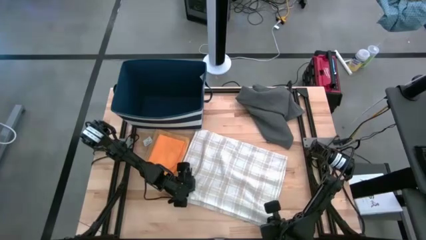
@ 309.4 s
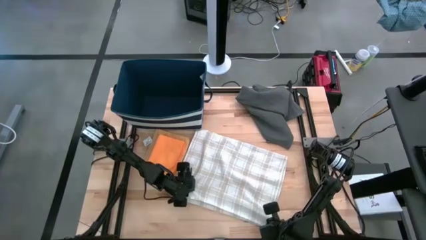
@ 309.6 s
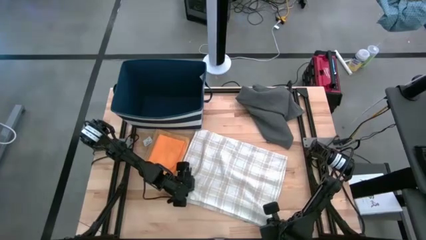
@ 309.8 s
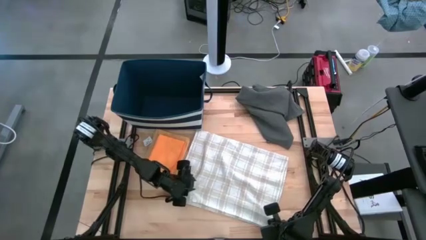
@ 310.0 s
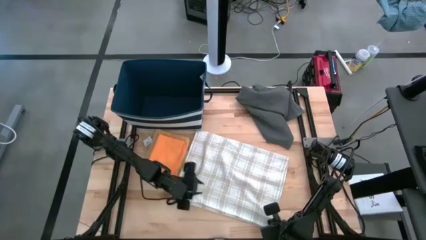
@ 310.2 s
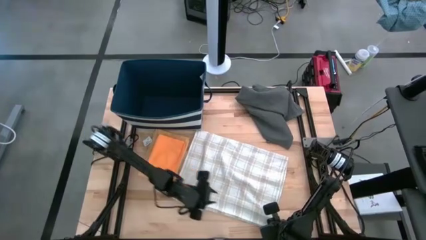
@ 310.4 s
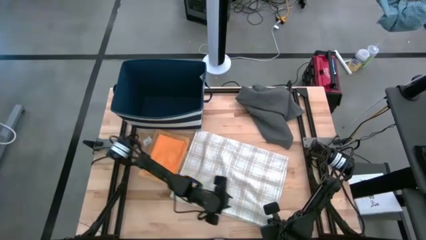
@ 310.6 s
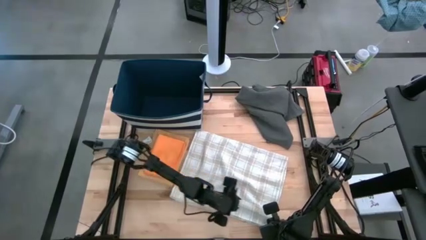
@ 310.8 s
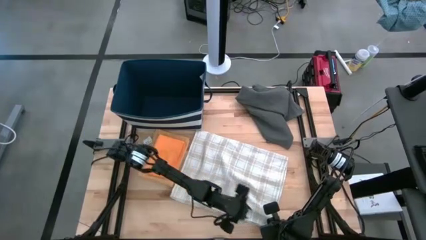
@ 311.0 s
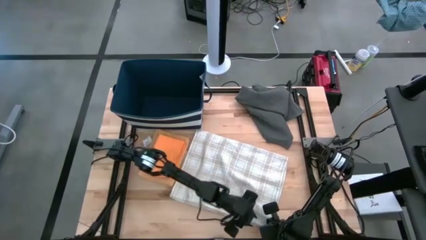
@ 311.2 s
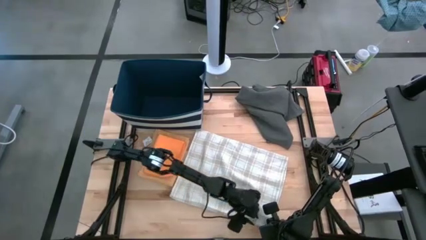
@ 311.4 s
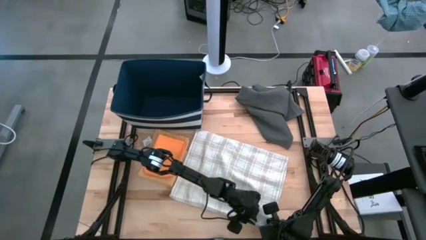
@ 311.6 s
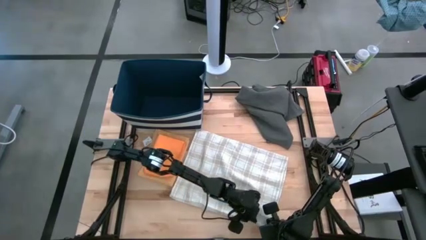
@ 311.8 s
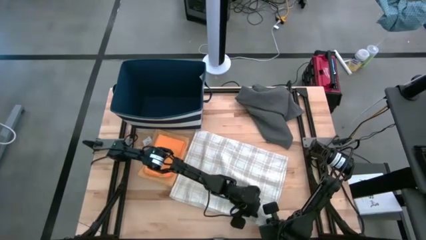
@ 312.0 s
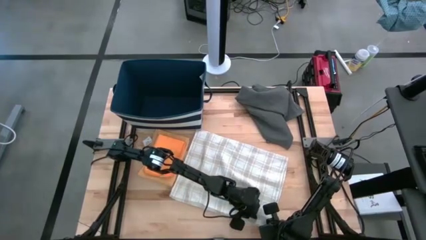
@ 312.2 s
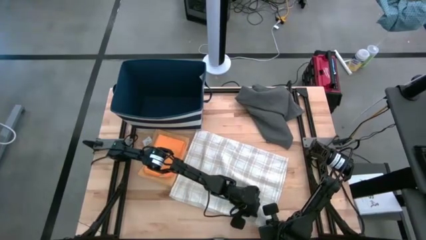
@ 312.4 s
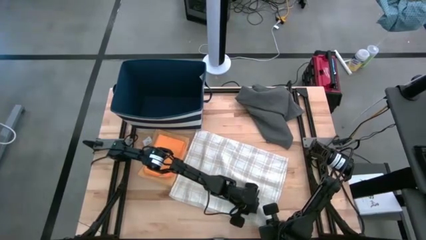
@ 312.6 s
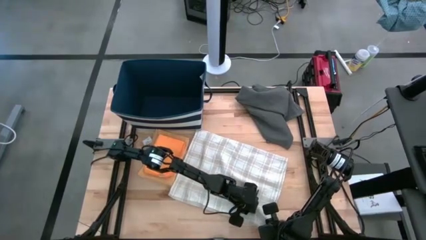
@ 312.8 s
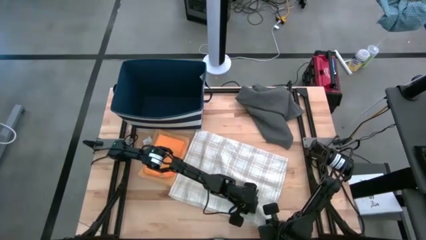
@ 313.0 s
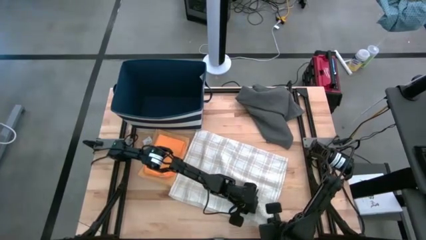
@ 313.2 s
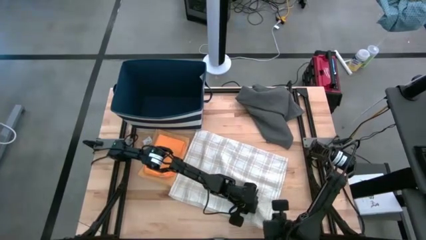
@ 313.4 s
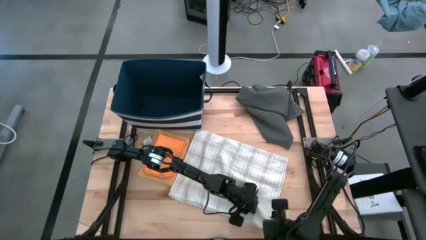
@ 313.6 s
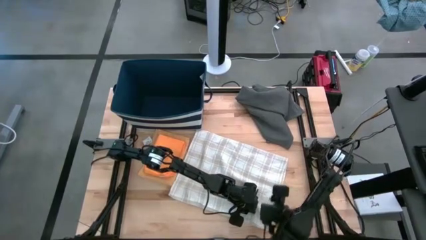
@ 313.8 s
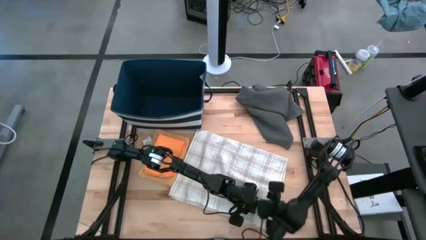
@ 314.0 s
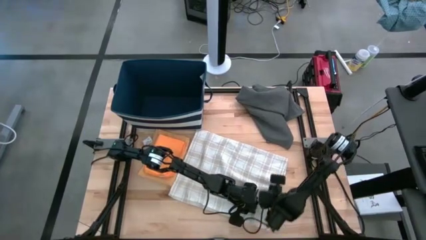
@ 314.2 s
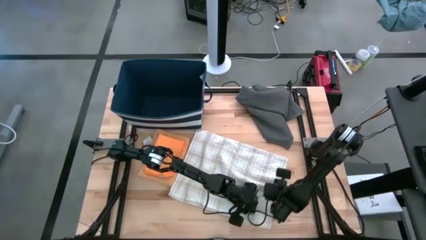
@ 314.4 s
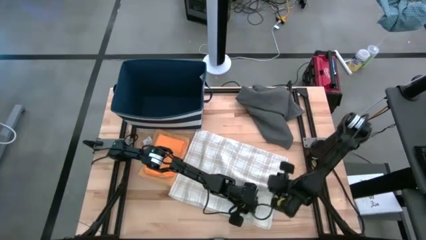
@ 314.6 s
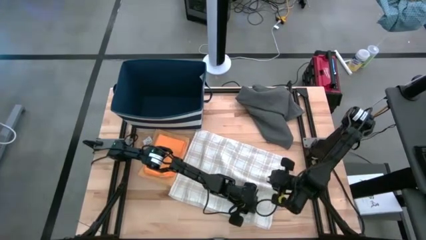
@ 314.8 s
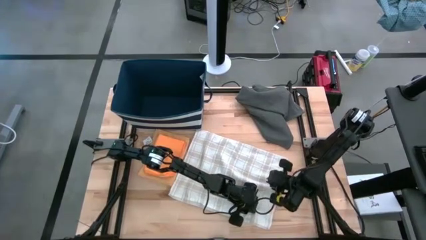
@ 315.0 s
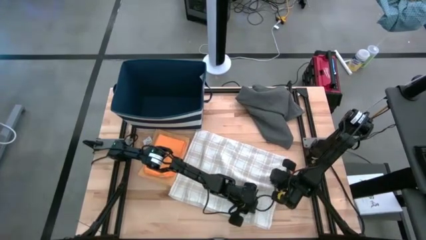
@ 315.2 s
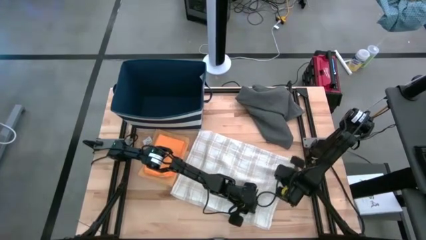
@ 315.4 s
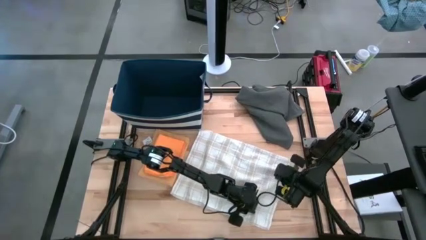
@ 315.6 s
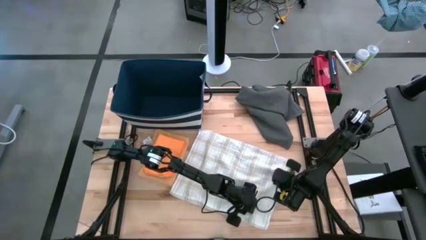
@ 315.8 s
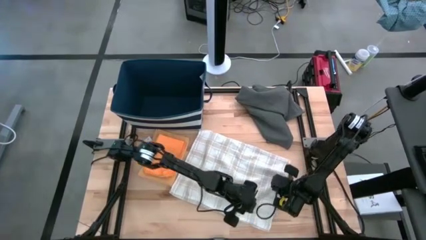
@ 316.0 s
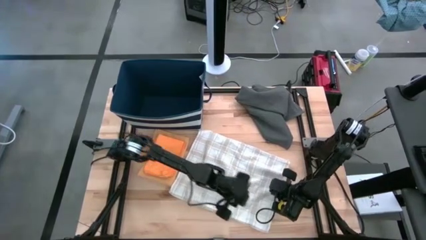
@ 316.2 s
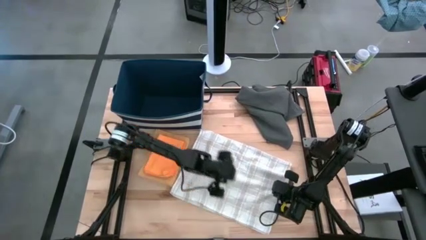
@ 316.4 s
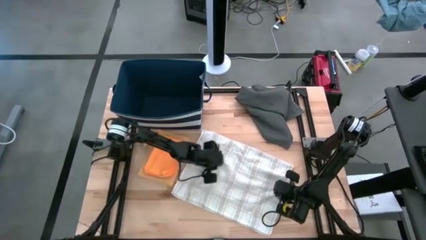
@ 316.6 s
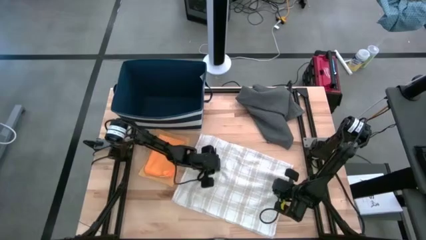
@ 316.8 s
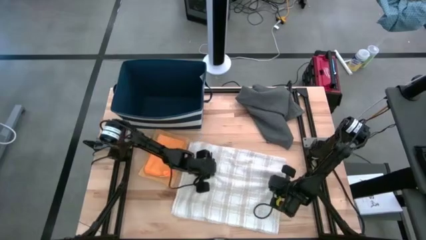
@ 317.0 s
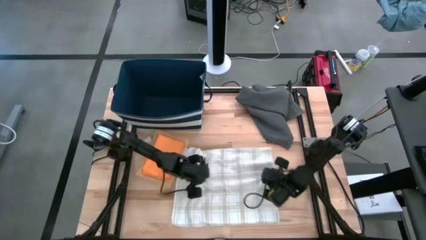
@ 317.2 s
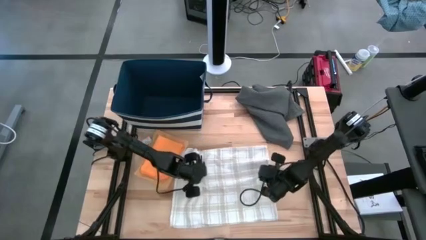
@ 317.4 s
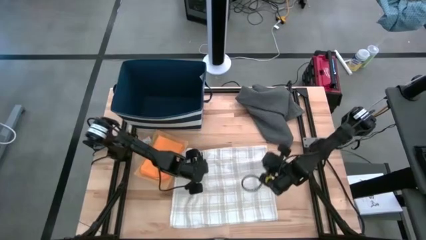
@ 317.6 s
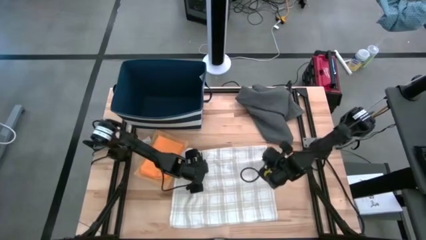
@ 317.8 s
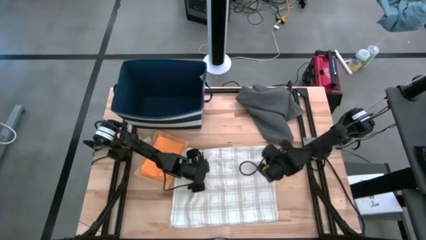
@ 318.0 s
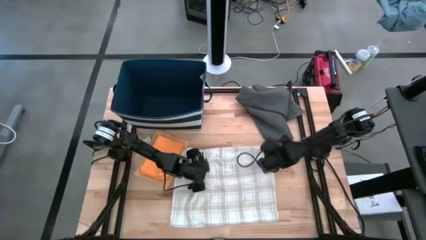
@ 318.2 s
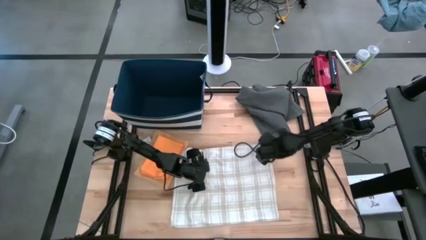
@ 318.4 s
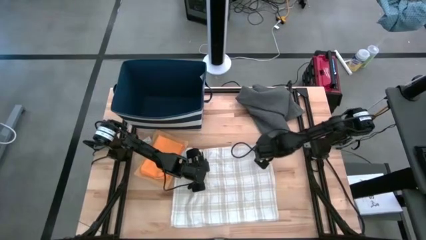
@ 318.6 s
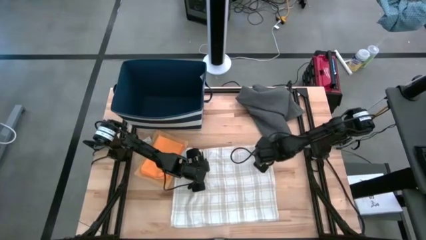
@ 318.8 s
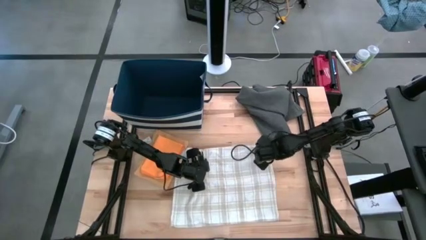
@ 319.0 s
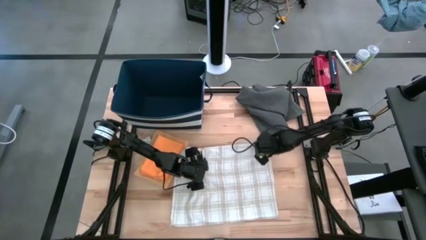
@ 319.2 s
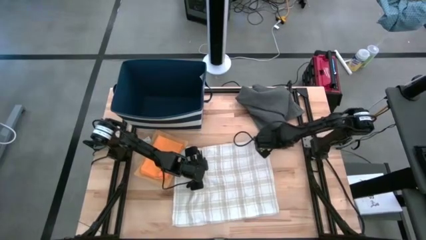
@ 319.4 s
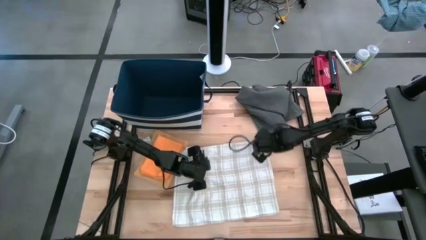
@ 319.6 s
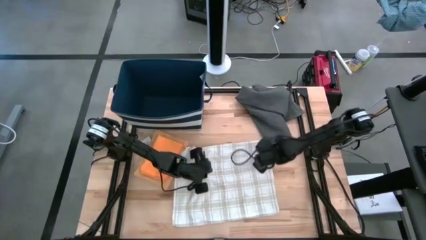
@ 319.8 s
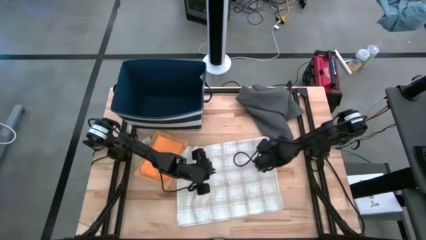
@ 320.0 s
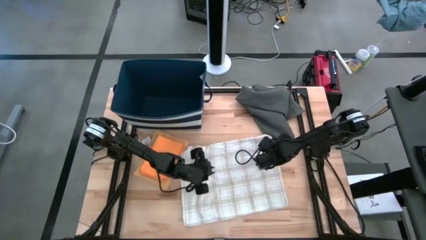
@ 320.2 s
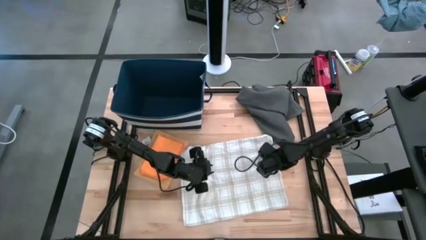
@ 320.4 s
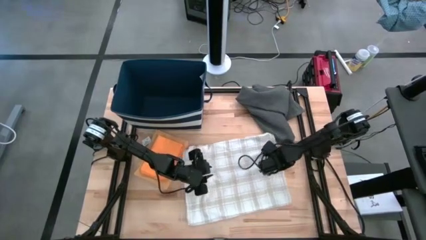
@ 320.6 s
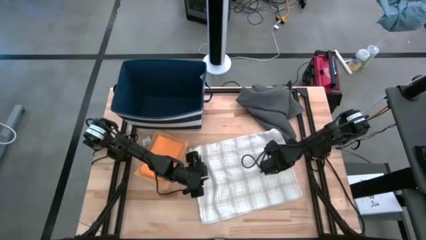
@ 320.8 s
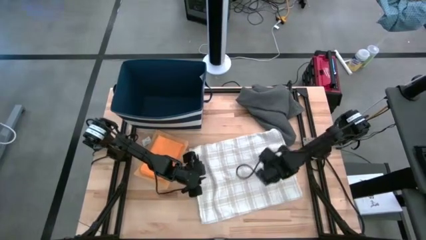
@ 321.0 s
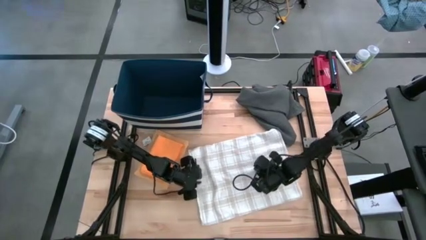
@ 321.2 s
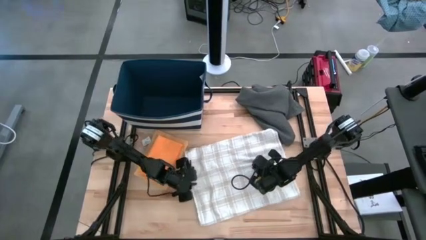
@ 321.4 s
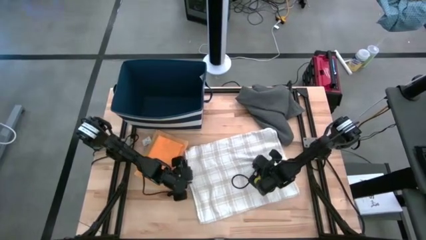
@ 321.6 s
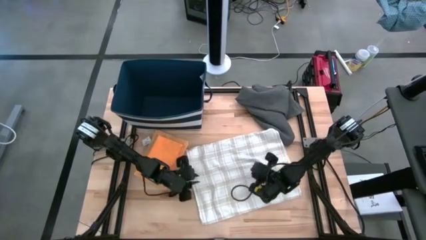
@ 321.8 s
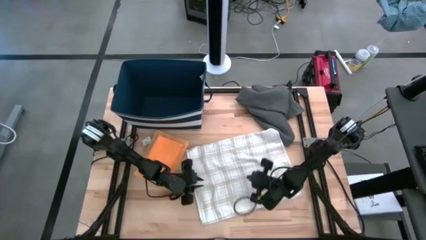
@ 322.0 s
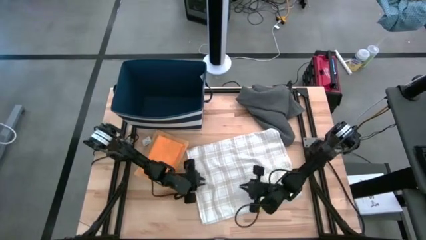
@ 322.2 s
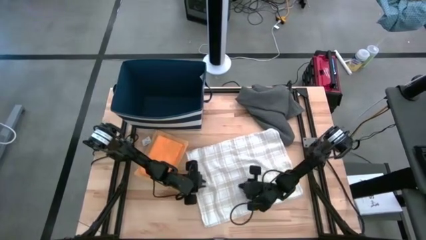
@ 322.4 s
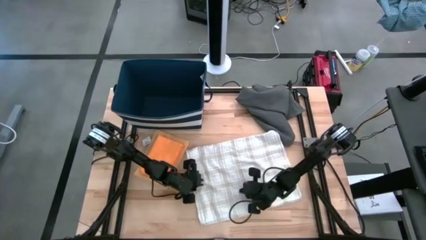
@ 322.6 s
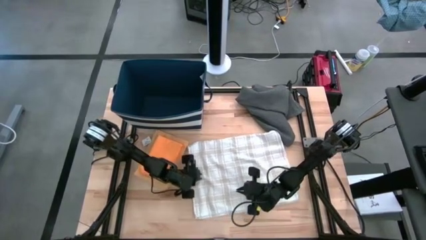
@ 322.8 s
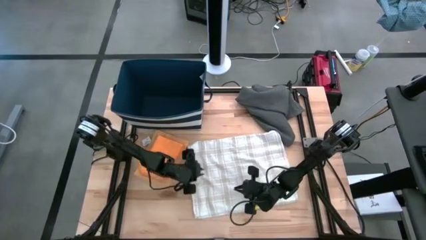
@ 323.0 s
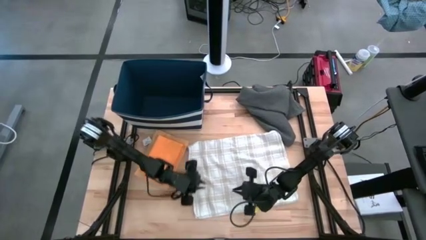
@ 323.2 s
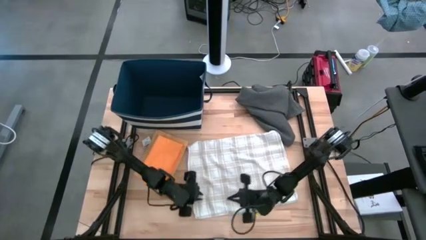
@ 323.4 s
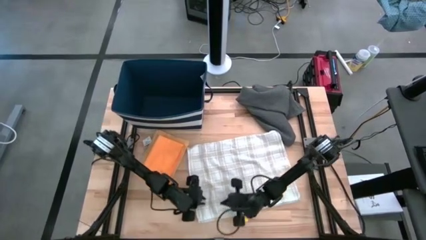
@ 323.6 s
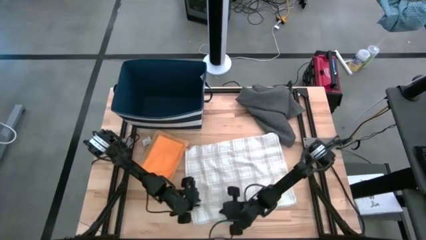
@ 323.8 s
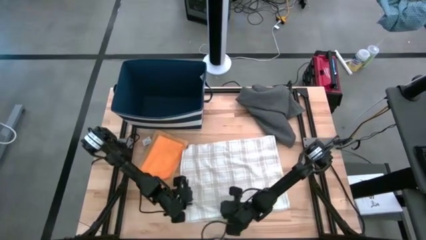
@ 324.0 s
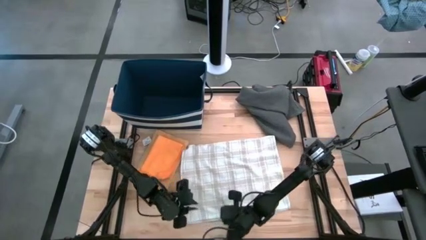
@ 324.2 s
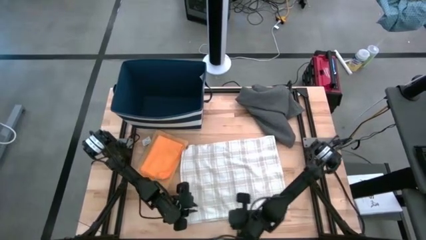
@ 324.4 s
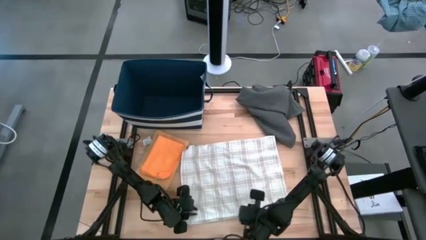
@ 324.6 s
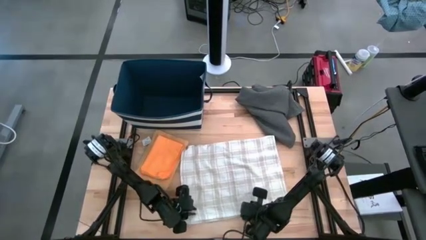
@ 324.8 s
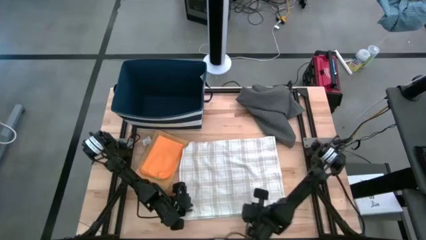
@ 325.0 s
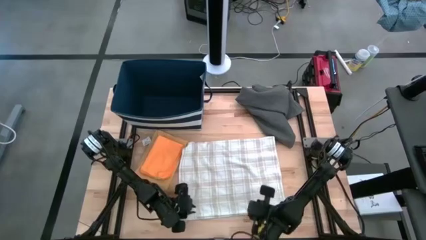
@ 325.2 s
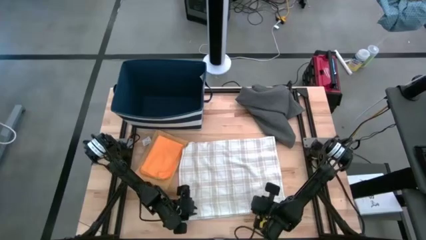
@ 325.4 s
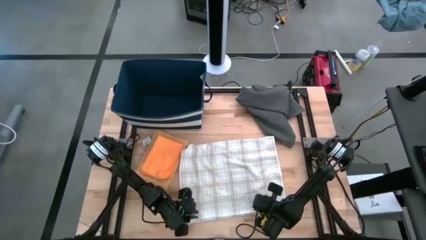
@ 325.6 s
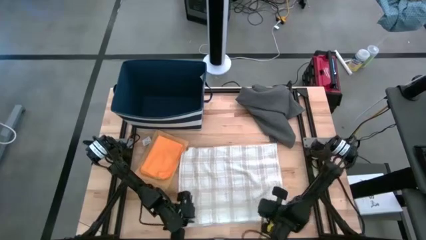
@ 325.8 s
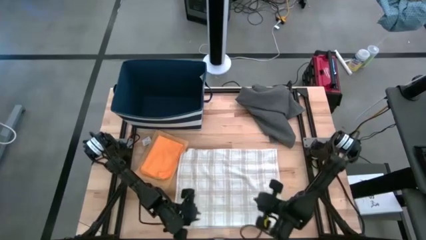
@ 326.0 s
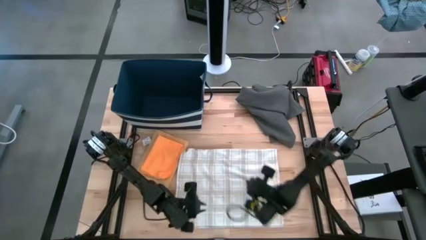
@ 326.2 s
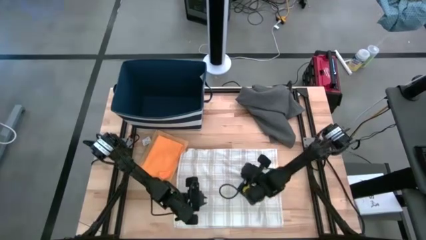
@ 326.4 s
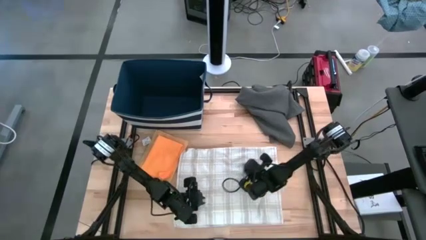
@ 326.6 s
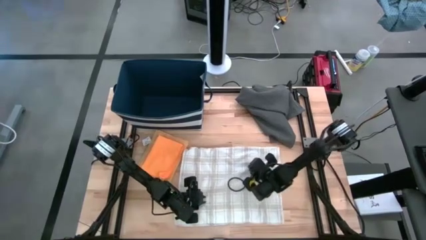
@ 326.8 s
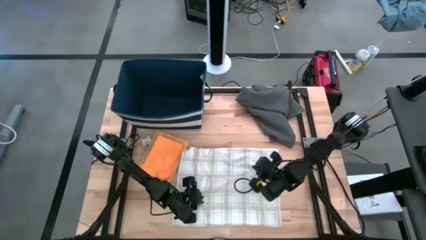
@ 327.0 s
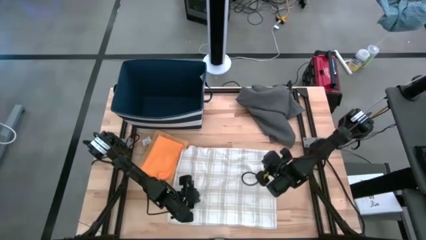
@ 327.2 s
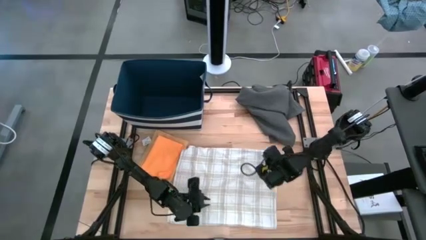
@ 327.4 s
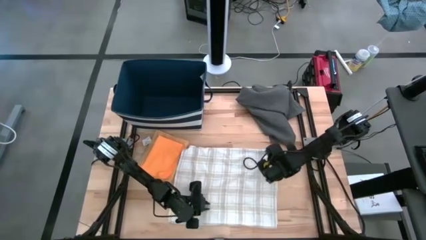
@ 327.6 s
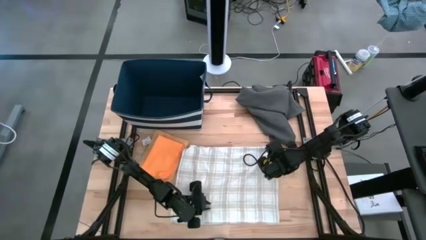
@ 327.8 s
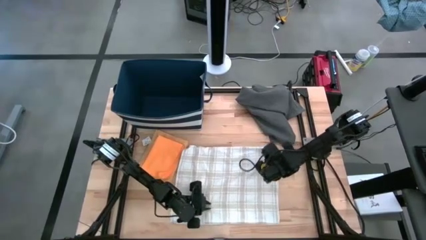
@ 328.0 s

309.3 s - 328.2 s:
Task: Fold towel
Fold the white patterned kitchen towel
